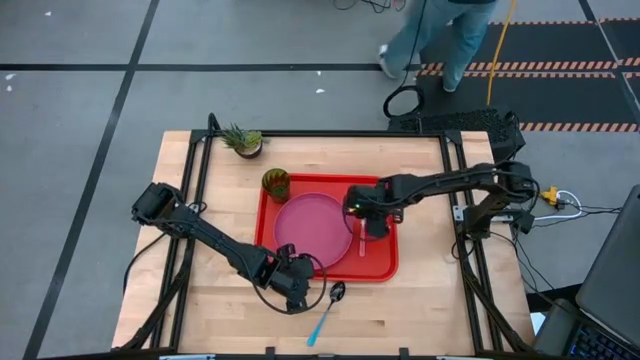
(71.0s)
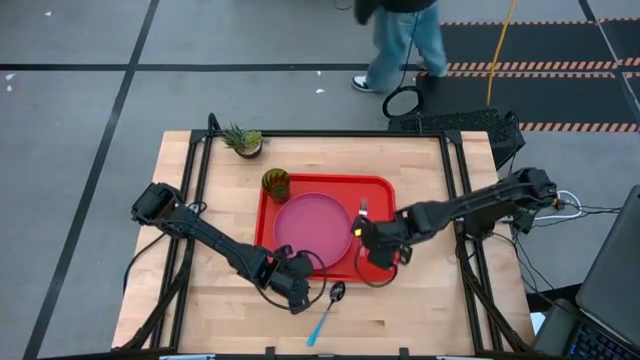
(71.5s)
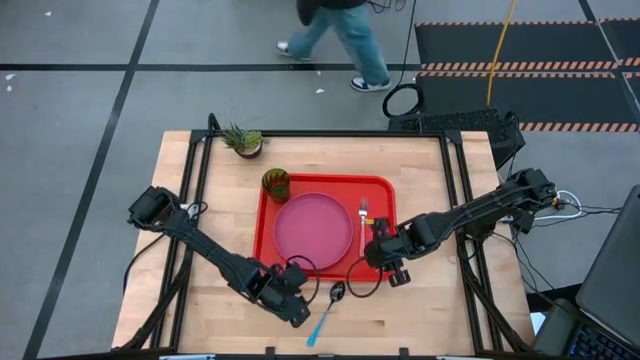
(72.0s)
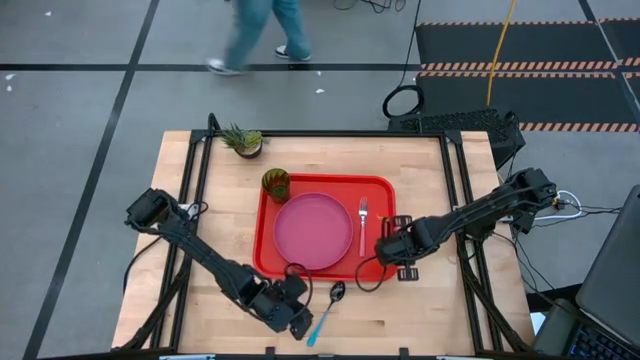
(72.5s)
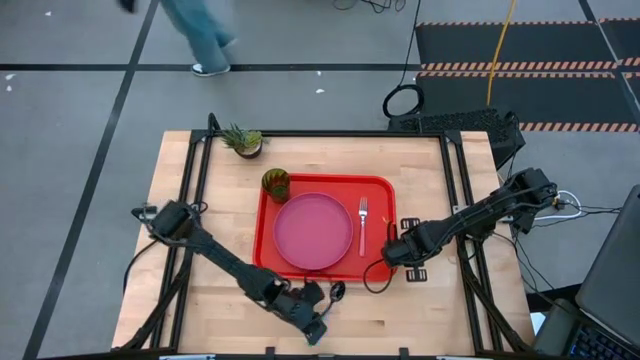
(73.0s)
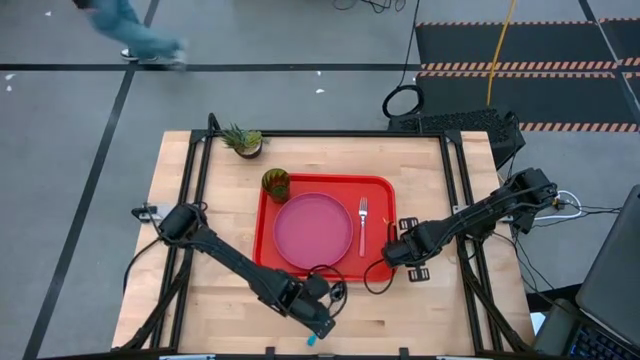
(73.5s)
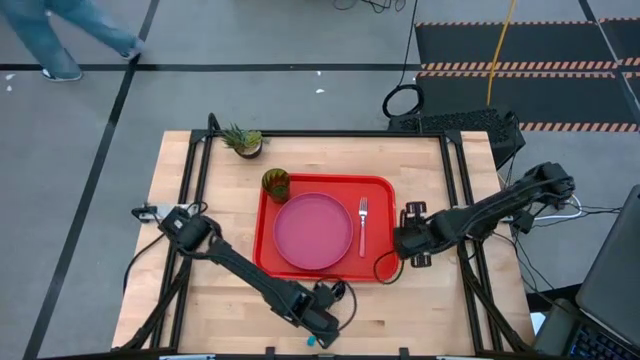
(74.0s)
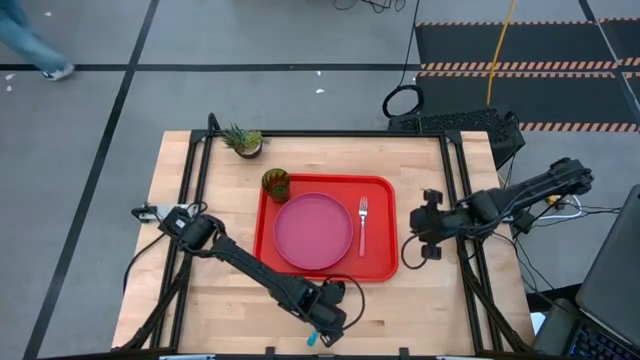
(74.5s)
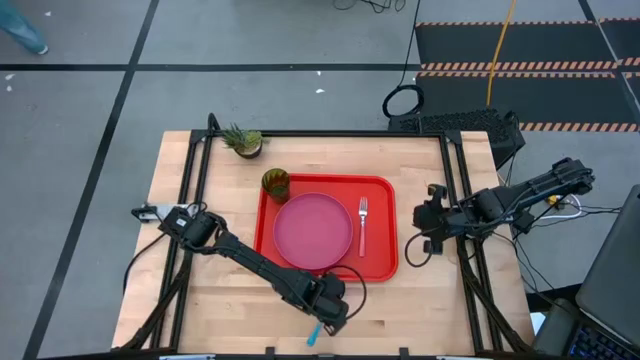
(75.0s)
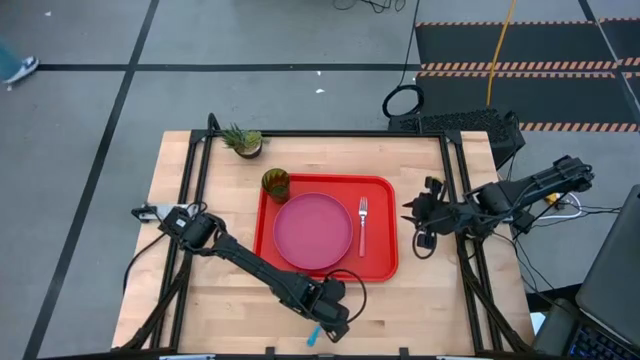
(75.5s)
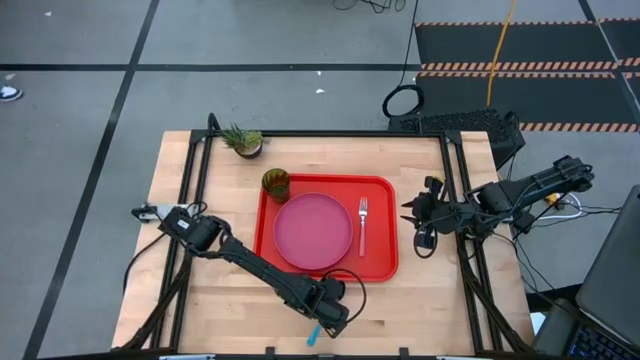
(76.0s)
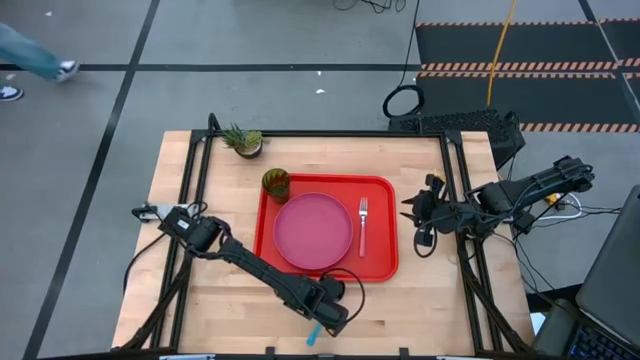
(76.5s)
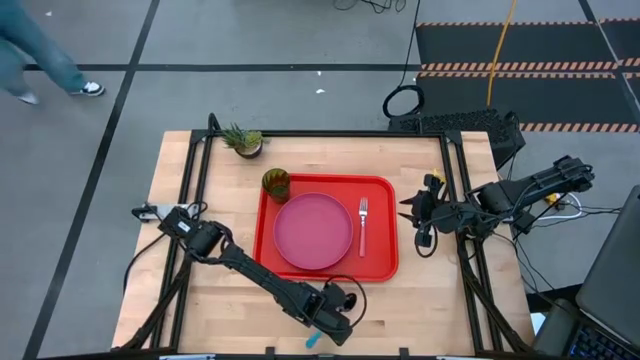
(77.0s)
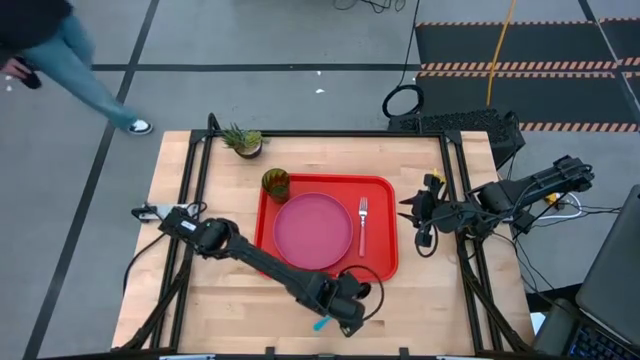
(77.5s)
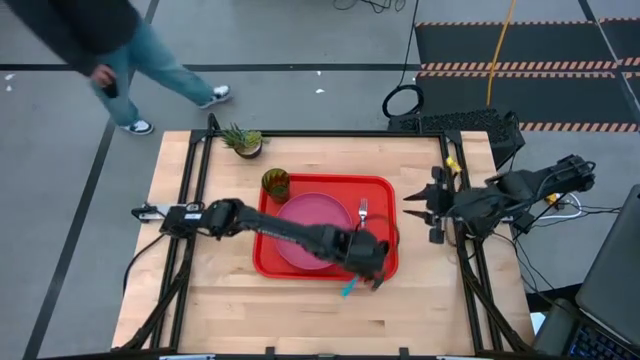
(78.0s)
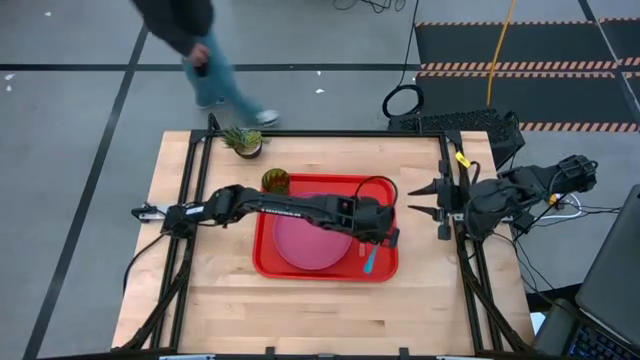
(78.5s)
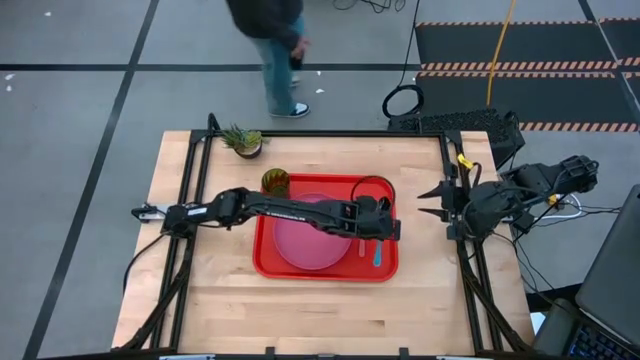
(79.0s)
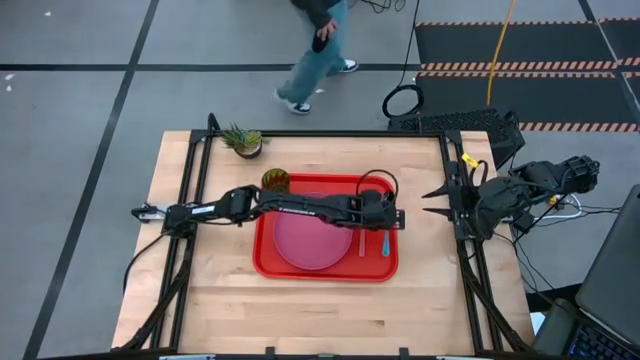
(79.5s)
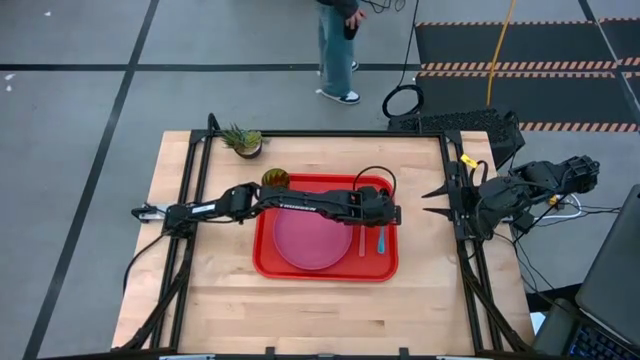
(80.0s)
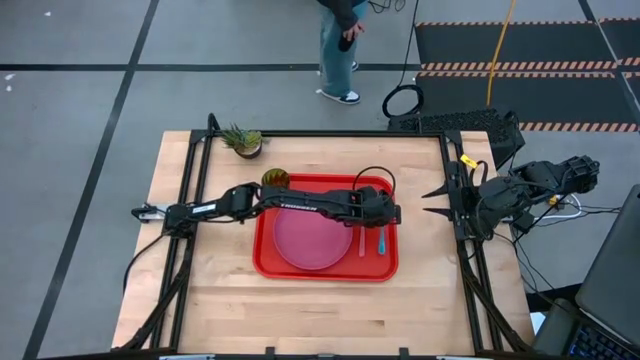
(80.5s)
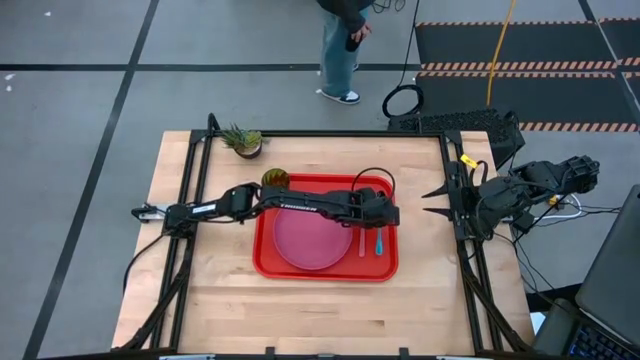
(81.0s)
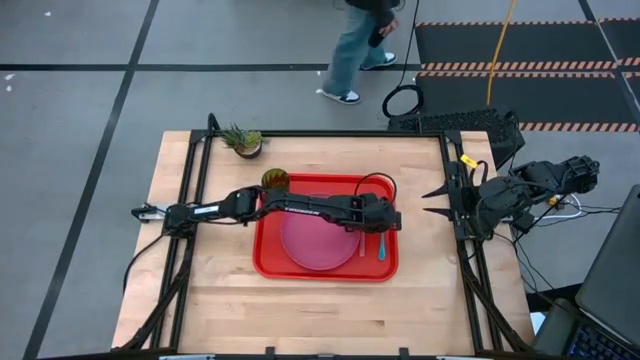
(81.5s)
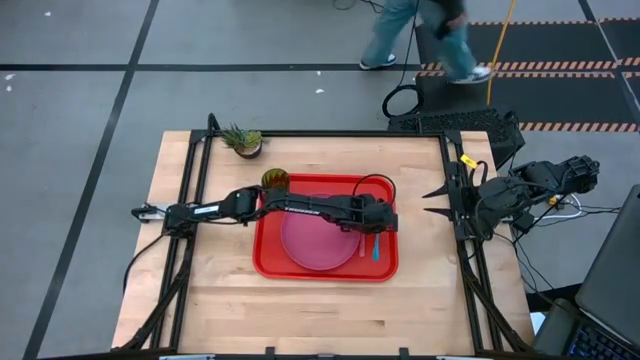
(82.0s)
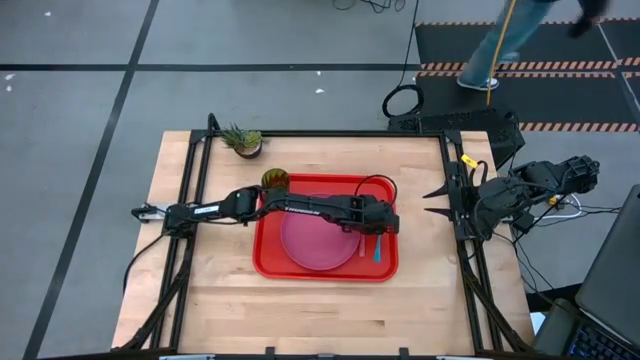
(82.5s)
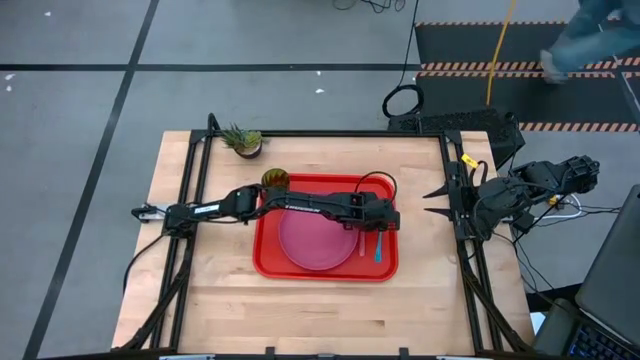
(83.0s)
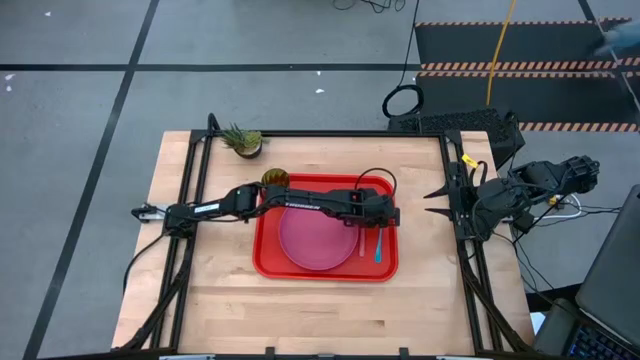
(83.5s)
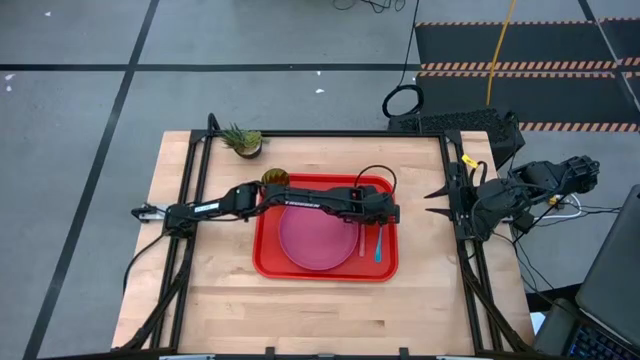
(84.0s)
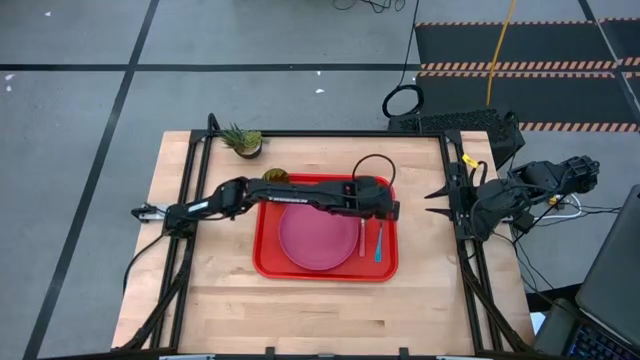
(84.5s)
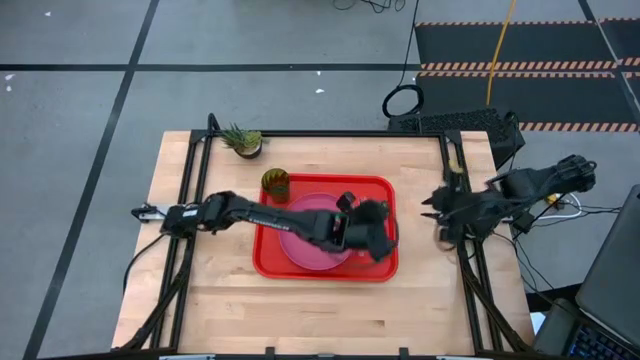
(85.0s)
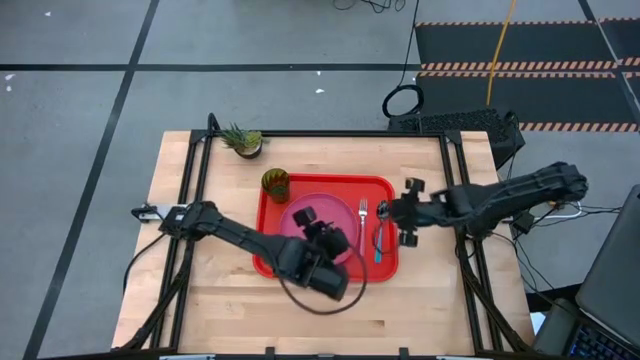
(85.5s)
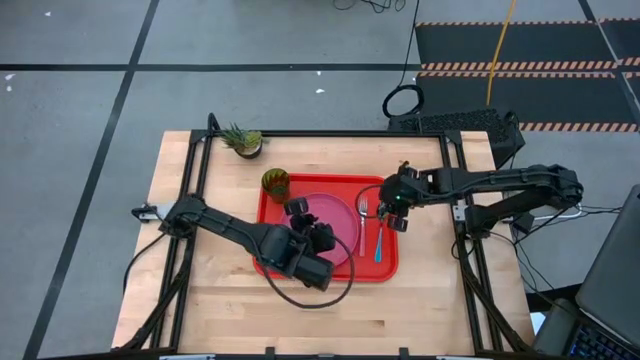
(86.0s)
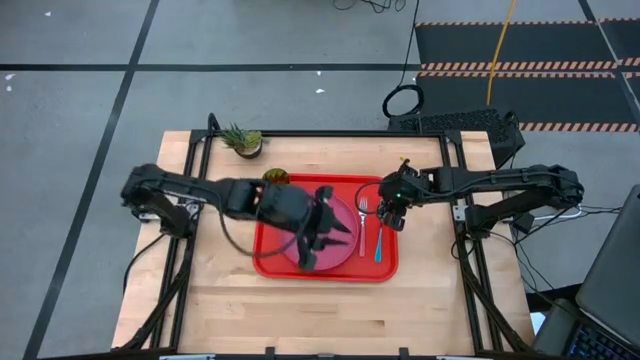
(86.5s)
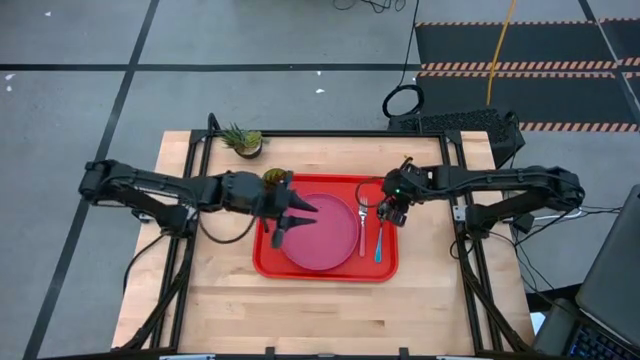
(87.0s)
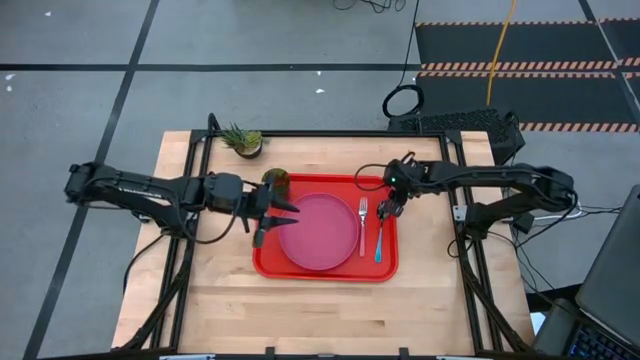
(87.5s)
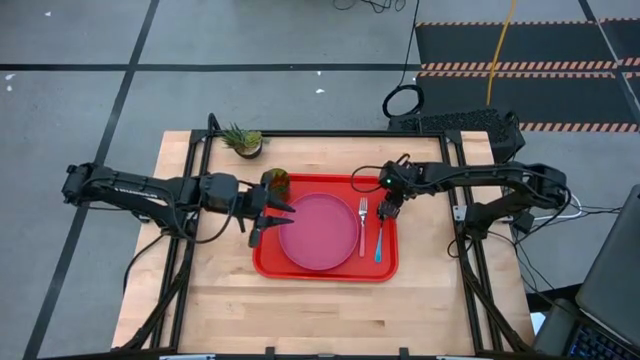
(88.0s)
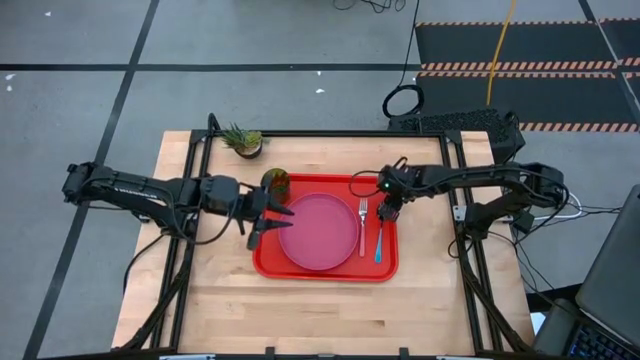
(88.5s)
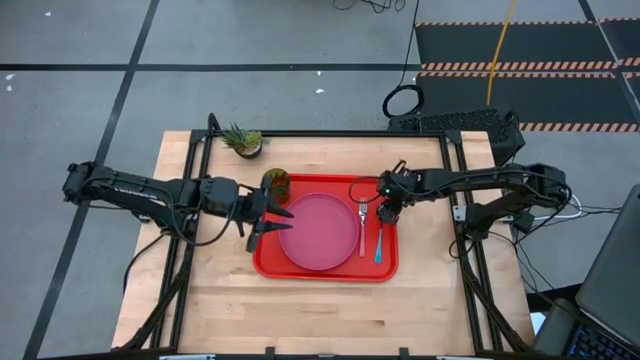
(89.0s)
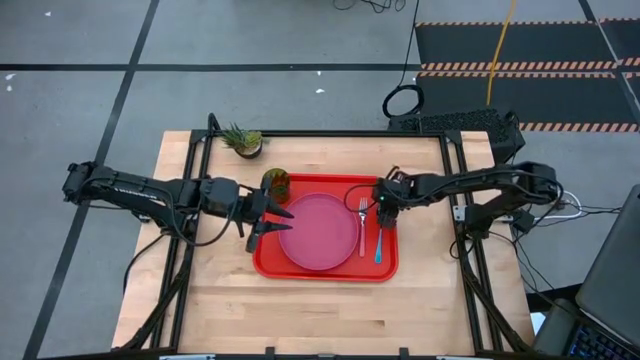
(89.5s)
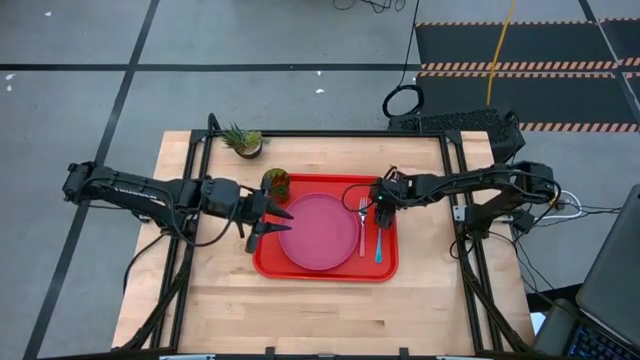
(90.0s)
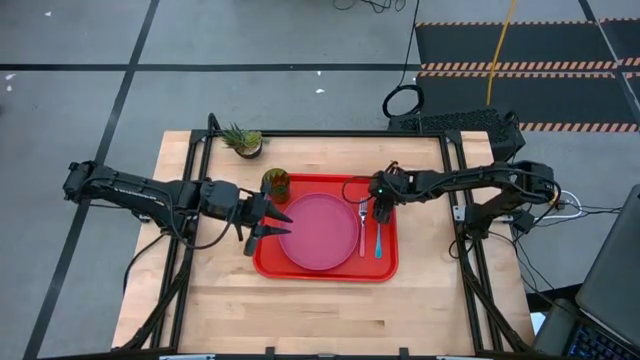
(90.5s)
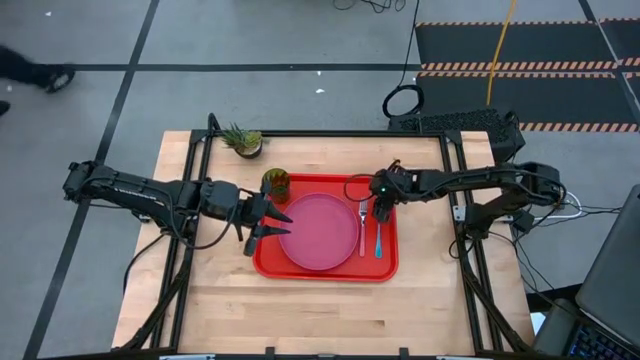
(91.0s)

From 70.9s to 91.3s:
Task: Pick and place plate/cup/fork/spoon on tray
Put the blue spoon on the orange tray to the right of the pink fork

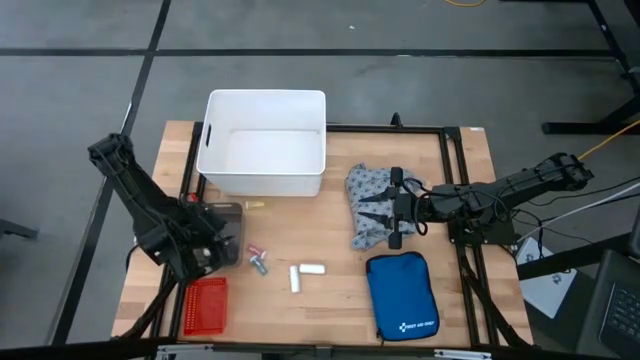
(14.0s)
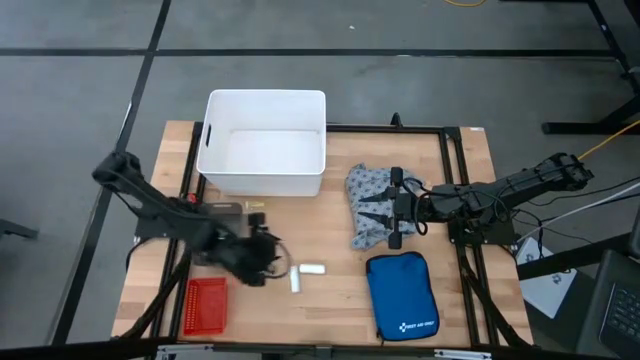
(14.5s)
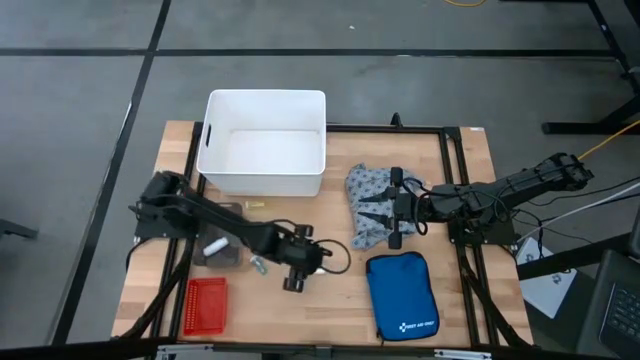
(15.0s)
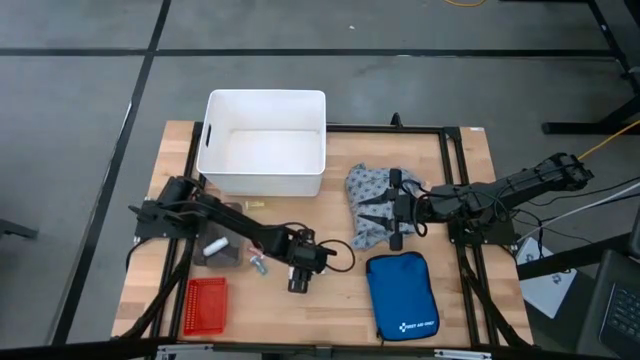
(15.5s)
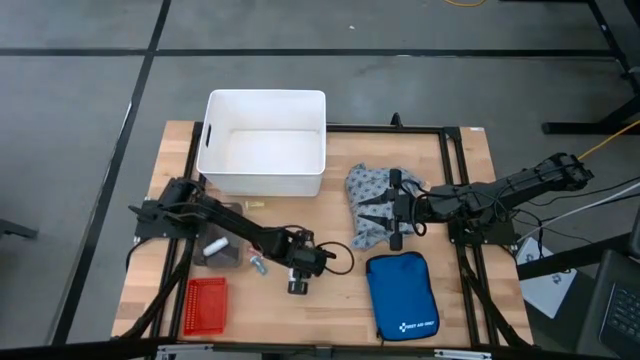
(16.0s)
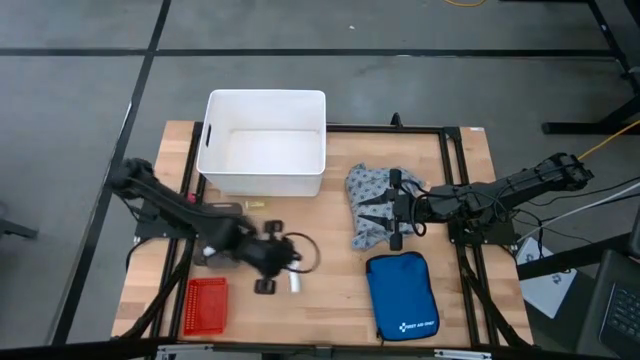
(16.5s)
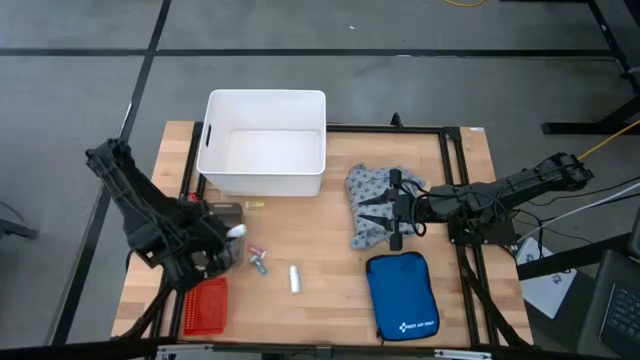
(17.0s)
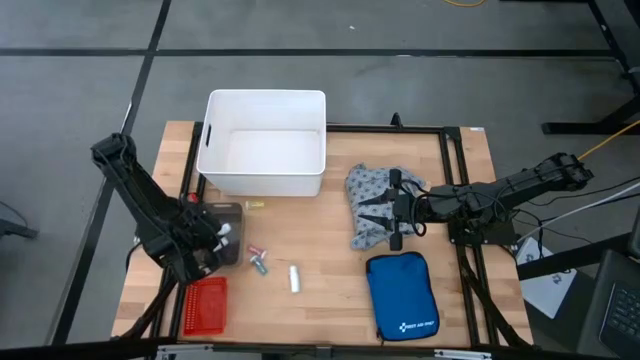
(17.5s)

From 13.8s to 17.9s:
Task: Pick & place medical supplies in basket/bin
Put the right white bandage into the black bin
